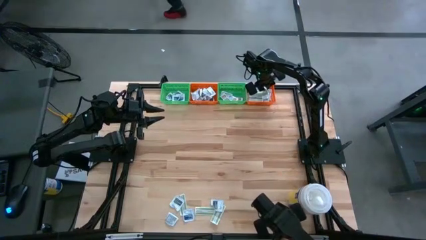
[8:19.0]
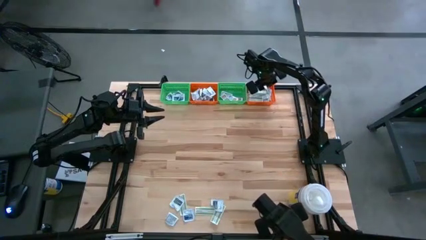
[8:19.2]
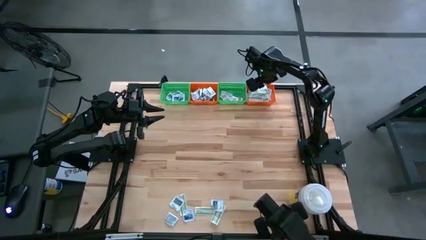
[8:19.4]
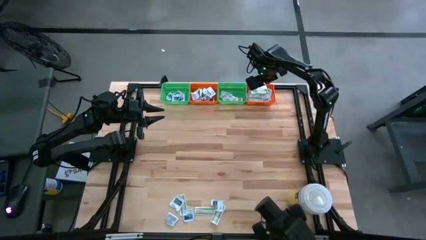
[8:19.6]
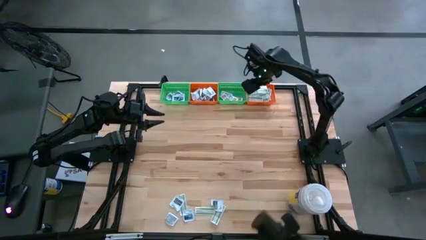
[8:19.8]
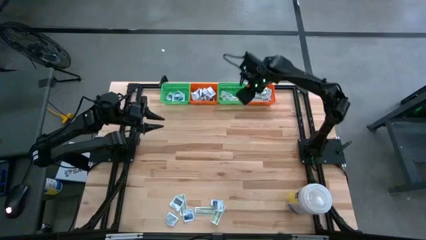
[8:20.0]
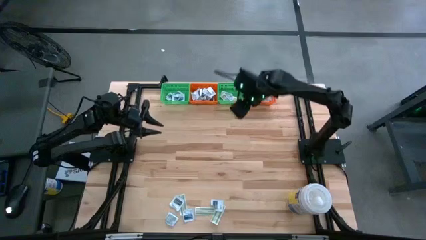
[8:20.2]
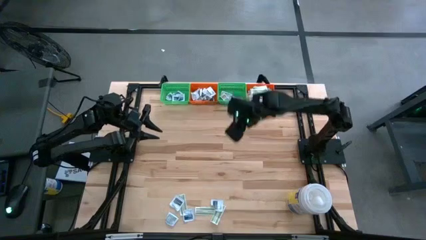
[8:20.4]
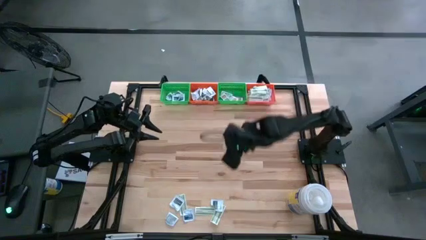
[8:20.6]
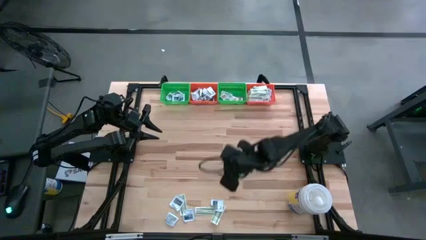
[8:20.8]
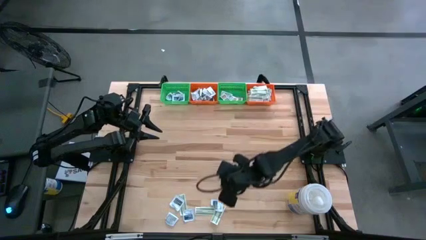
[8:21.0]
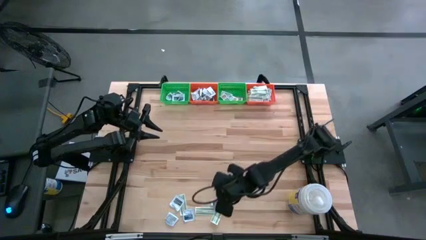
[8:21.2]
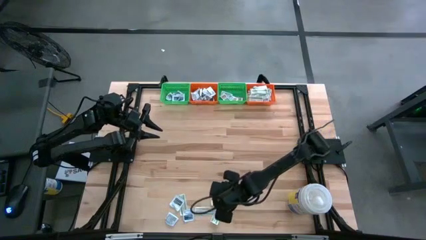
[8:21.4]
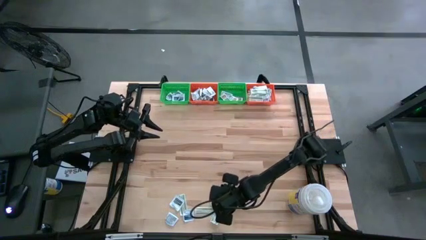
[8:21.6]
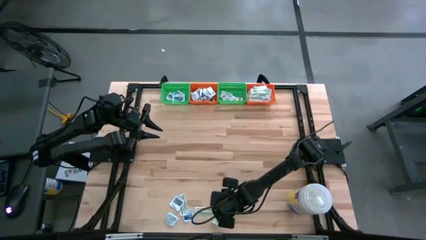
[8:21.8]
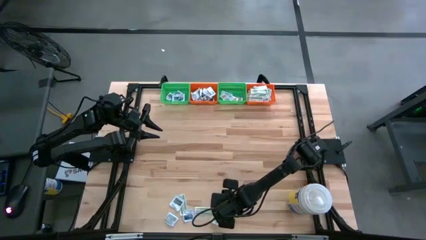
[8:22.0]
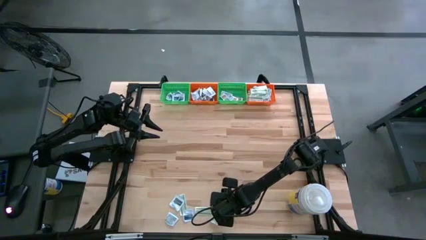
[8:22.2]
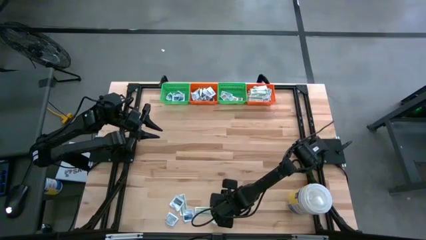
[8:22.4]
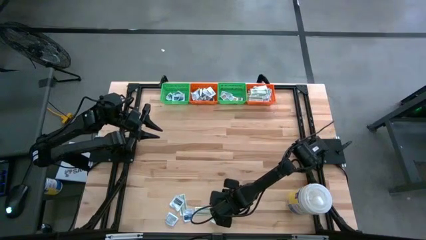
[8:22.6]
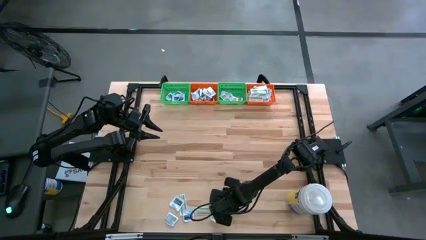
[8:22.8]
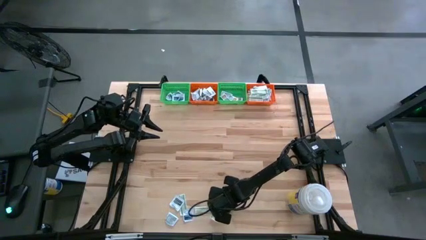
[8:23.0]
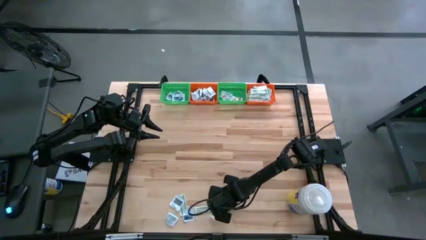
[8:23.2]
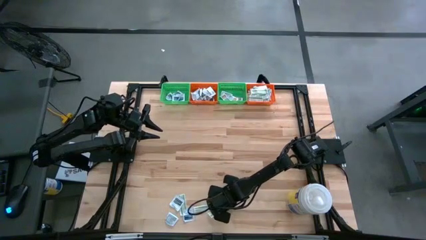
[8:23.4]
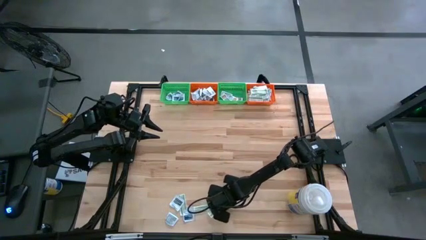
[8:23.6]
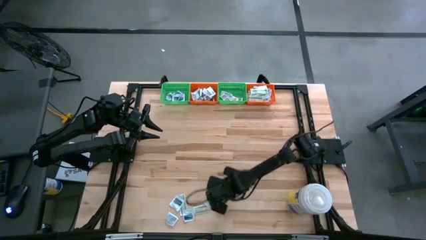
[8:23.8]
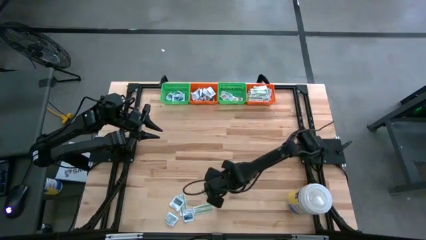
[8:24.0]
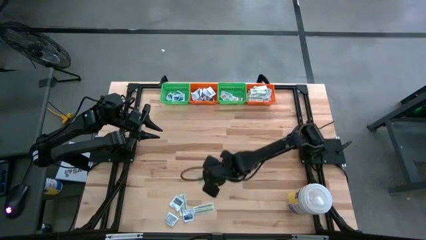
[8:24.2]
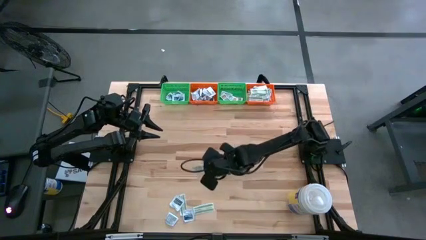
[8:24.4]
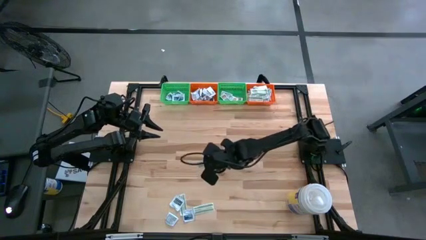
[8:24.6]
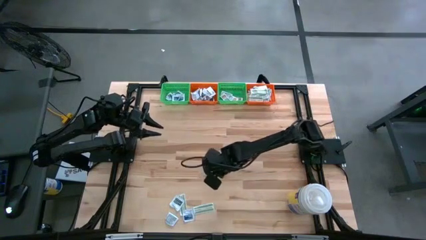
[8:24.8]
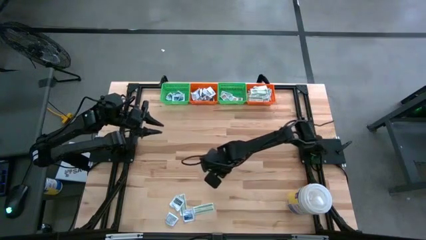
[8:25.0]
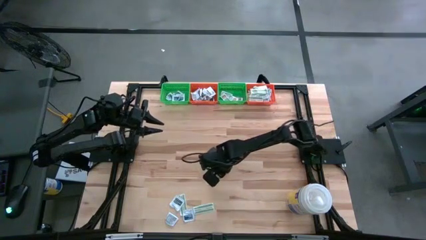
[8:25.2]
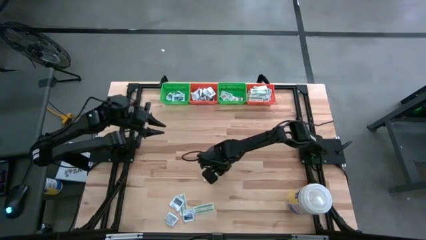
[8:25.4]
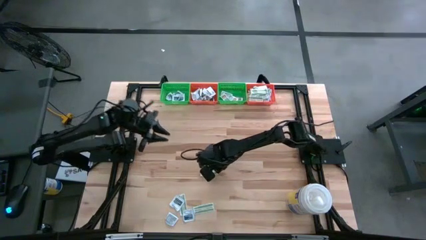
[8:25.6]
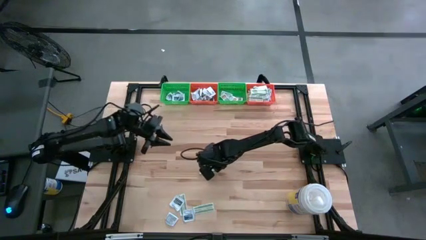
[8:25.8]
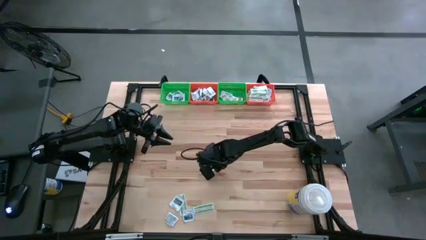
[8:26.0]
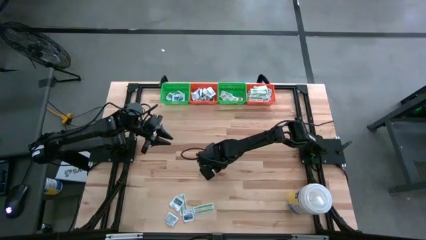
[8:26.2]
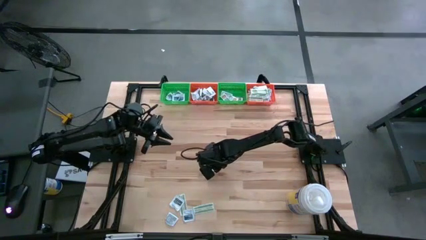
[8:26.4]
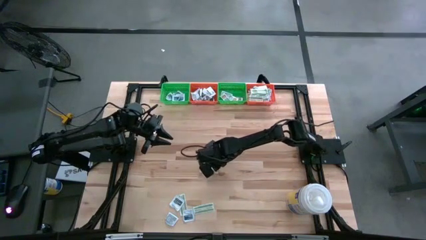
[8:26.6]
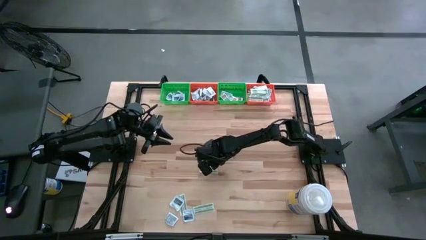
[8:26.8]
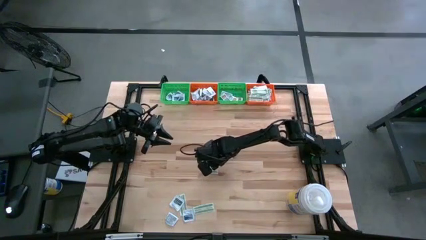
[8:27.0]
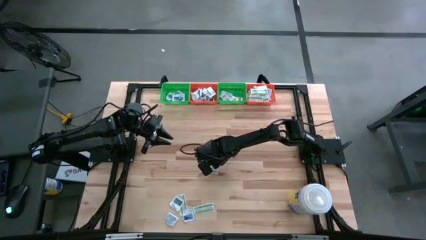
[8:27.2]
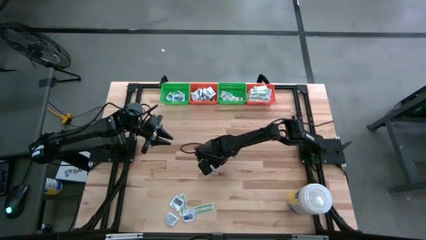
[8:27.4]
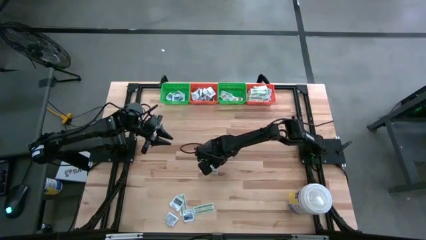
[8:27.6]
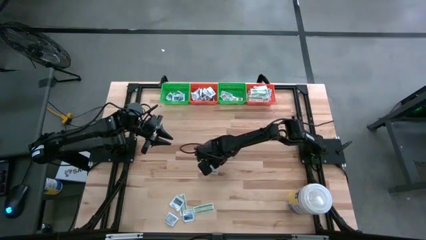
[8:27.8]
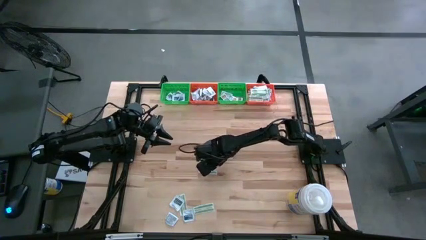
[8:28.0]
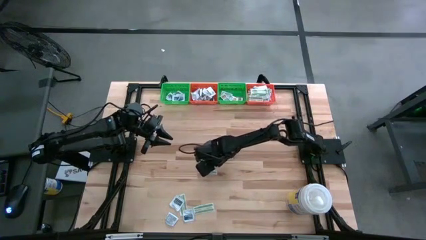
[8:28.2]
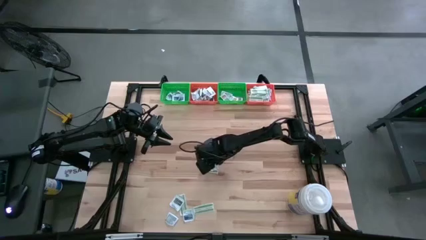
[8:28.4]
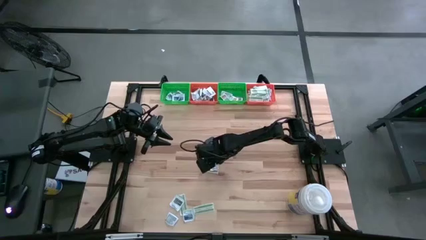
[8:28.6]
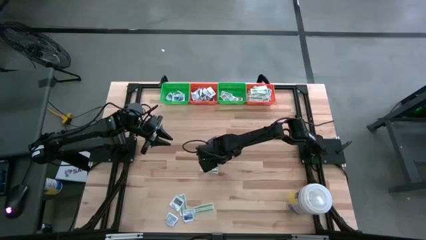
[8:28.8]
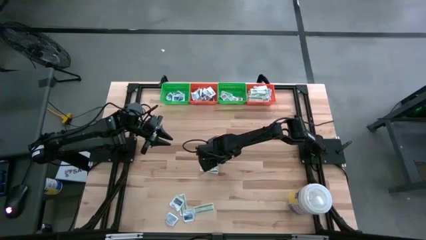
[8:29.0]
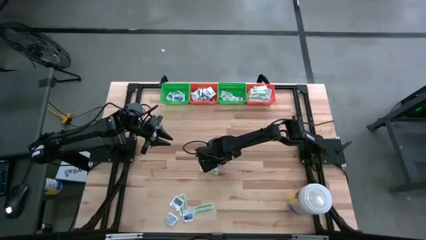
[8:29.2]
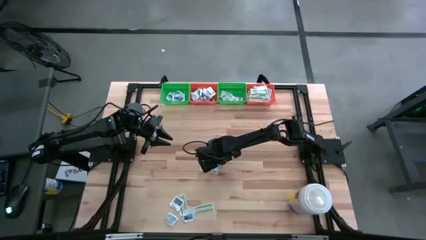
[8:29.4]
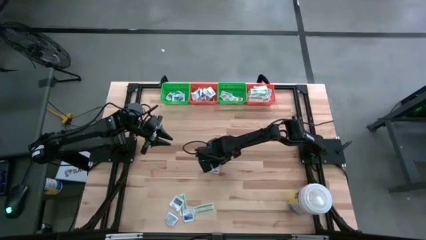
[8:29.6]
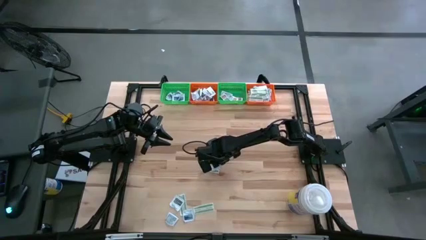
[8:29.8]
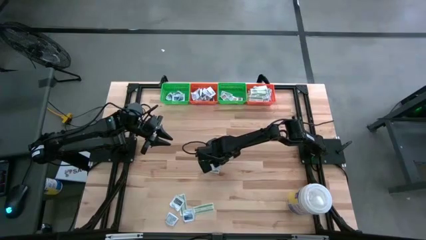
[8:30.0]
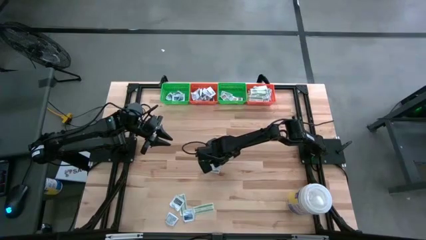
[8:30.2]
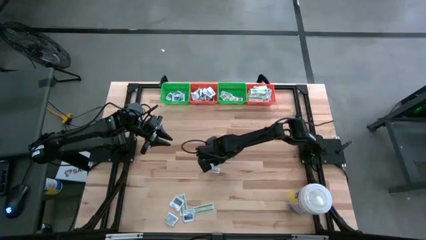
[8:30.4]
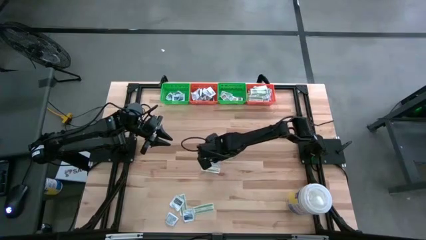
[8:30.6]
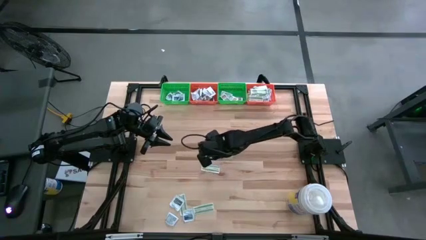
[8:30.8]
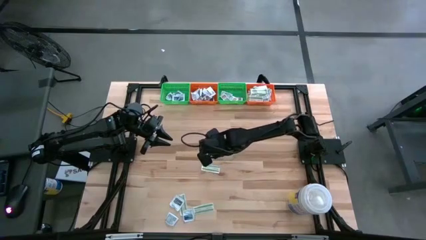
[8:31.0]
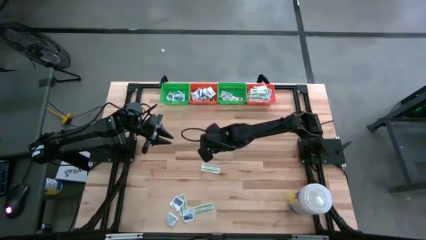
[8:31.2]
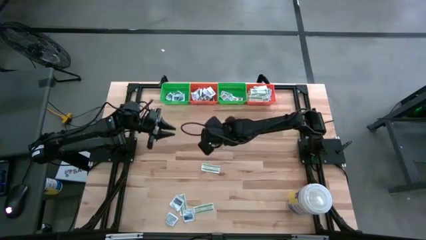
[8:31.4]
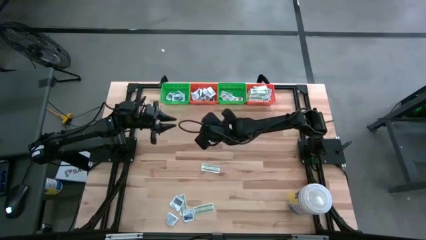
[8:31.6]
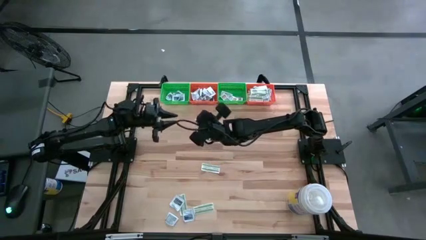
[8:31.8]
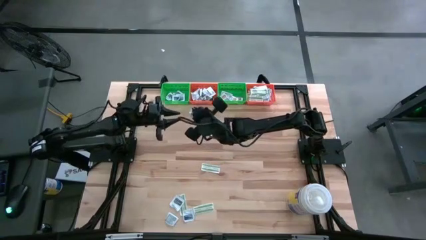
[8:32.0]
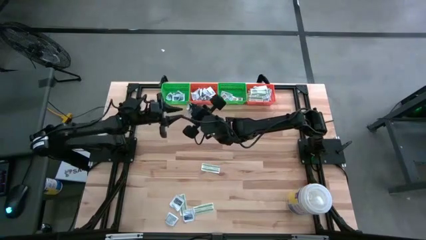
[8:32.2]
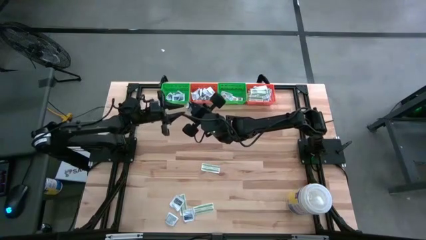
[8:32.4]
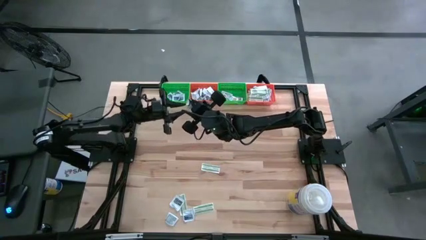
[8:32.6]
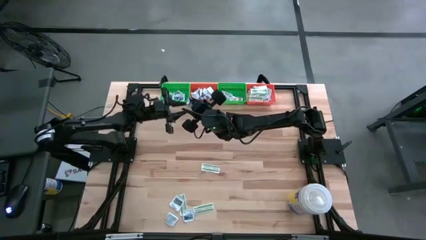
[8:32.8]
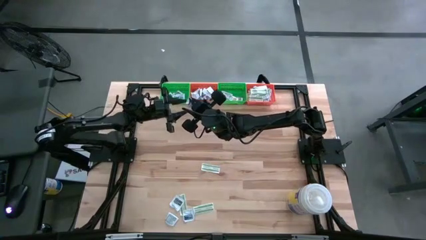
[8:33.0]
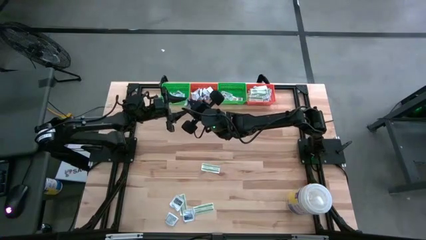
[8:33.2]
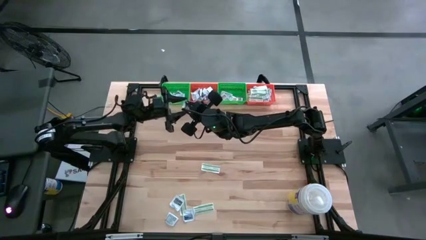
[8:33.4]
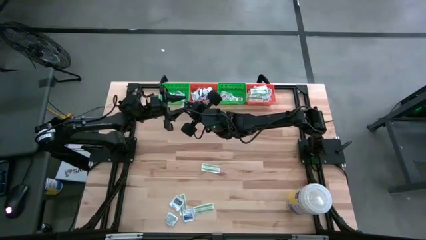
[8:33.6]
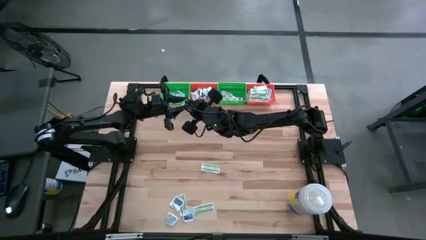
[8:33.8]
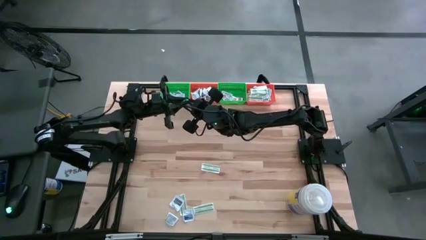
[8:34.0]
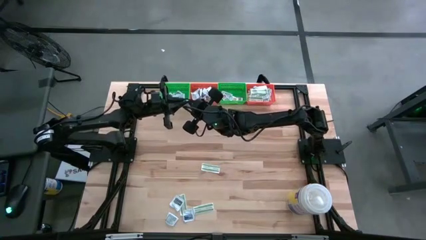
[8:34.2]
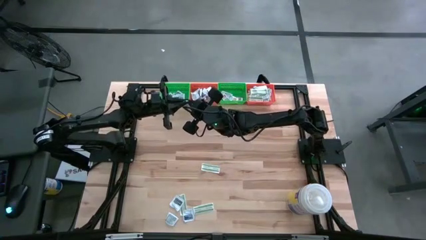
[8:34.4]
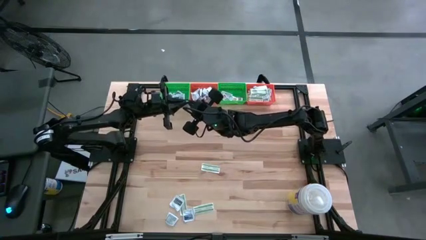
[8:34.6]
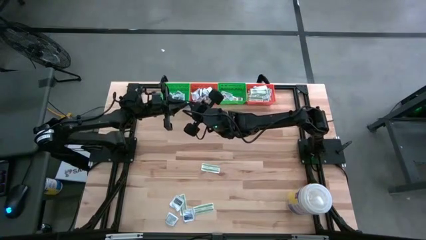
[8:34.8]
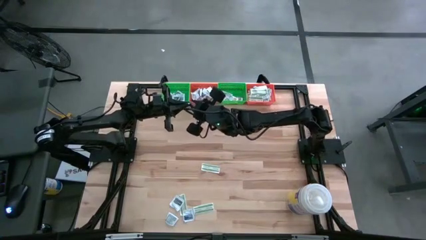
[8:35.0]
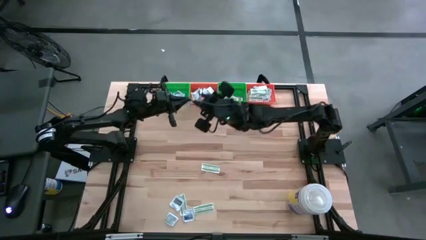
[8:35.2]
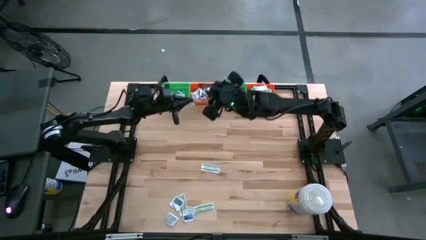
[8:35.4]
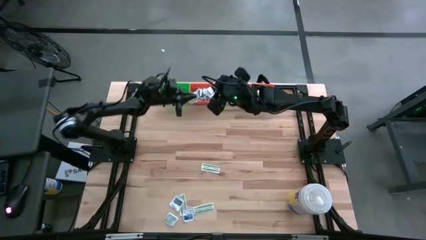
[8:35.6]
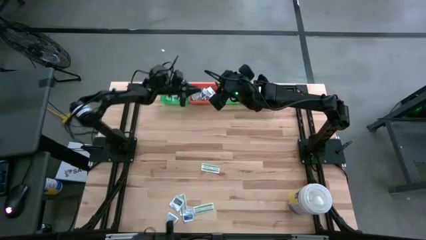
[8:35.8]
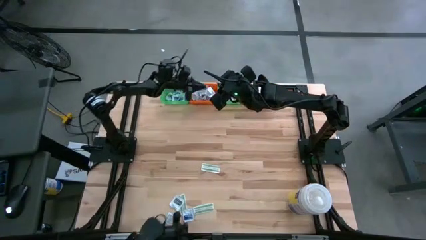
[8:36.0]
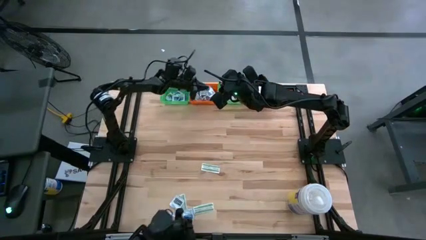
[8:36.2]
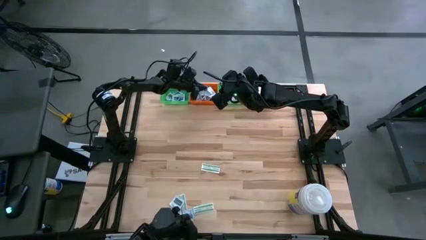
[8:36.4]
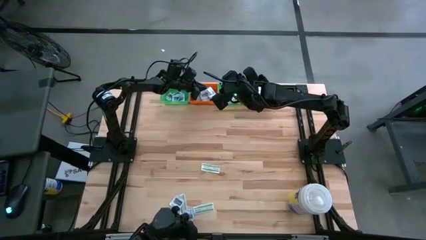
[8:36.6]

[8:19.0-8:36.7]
Task: Pick & Place First Aid Supplies
Put the top gray towelette pack in the left orange bin
